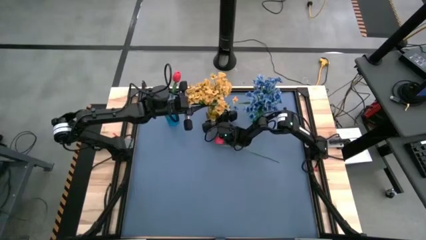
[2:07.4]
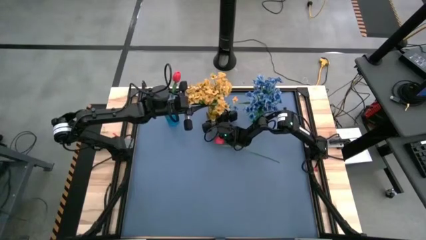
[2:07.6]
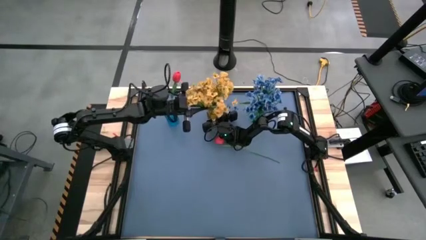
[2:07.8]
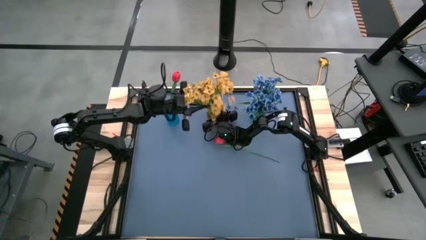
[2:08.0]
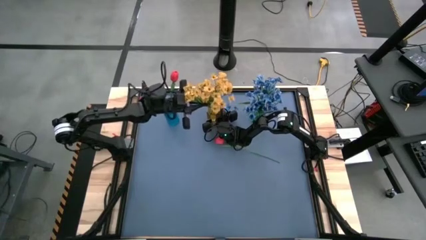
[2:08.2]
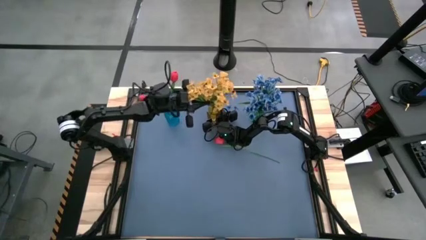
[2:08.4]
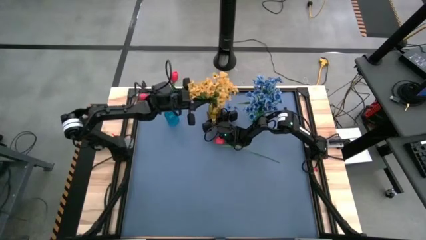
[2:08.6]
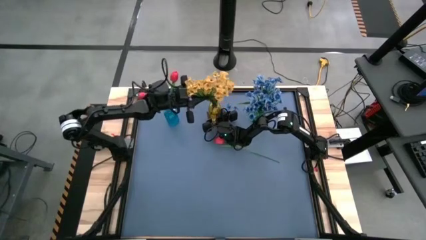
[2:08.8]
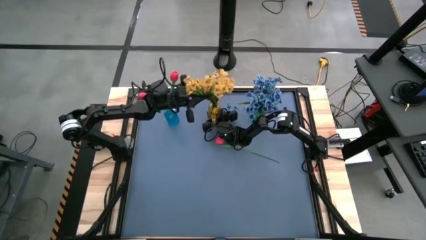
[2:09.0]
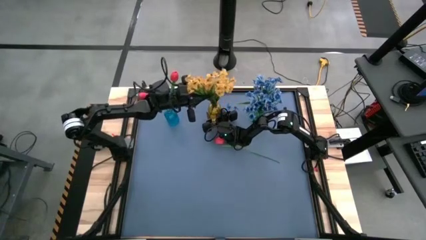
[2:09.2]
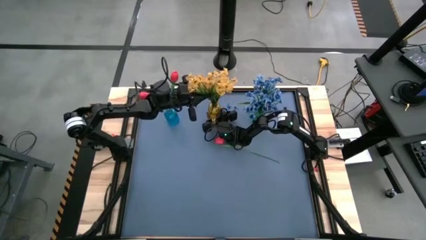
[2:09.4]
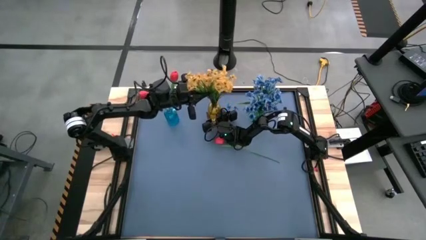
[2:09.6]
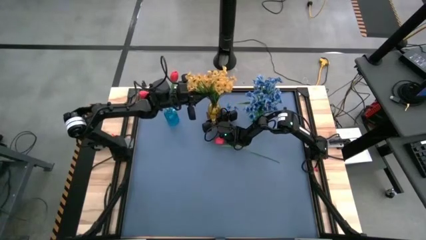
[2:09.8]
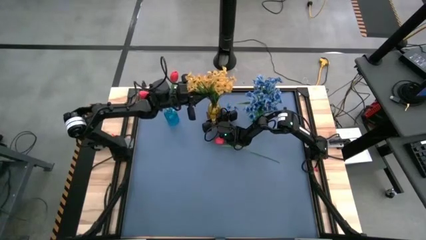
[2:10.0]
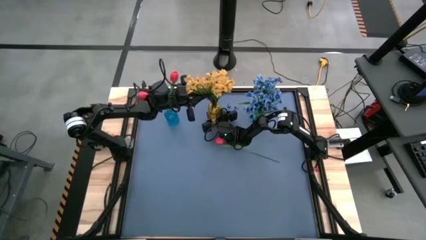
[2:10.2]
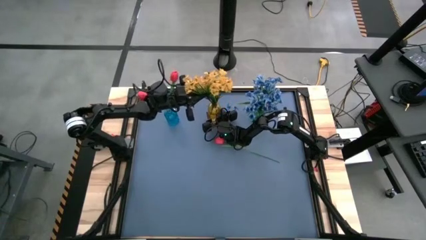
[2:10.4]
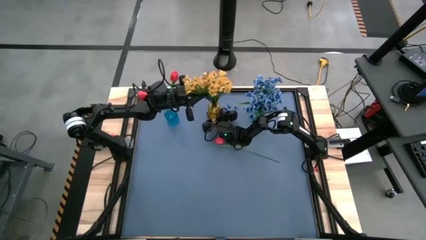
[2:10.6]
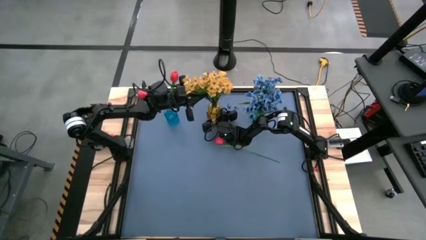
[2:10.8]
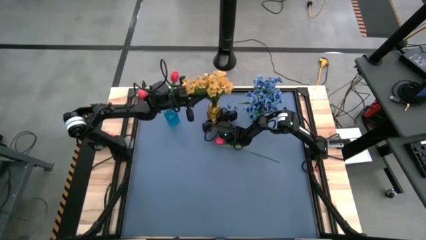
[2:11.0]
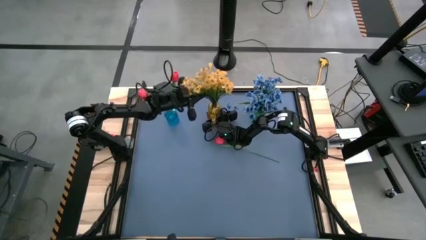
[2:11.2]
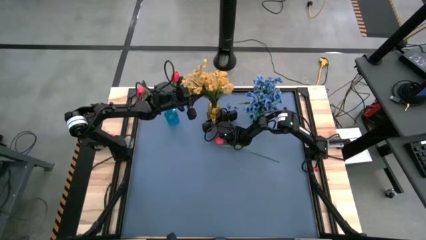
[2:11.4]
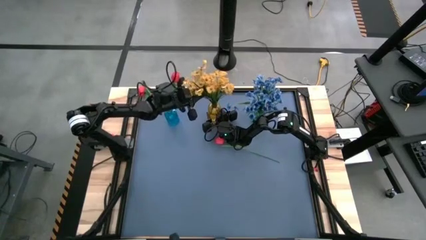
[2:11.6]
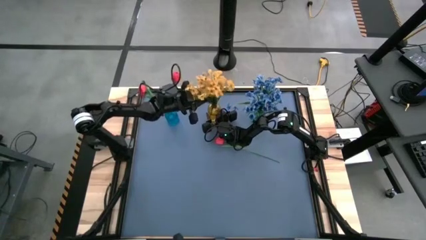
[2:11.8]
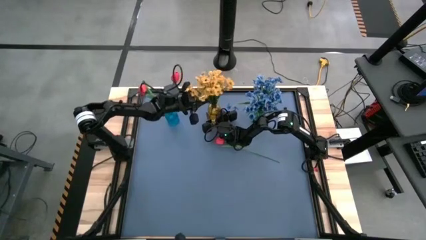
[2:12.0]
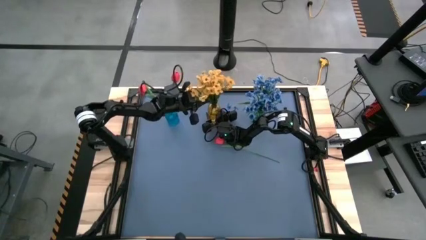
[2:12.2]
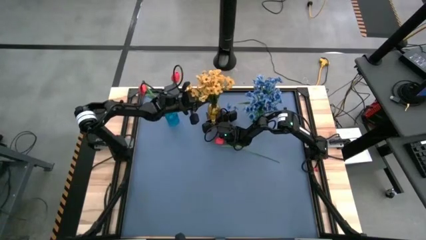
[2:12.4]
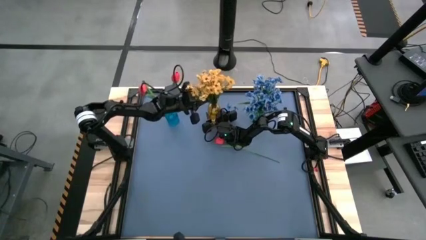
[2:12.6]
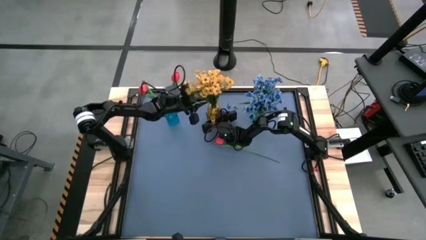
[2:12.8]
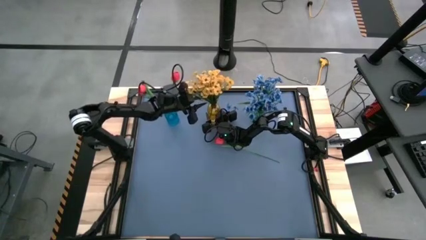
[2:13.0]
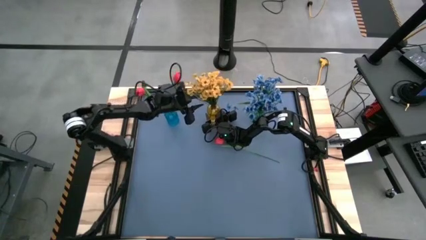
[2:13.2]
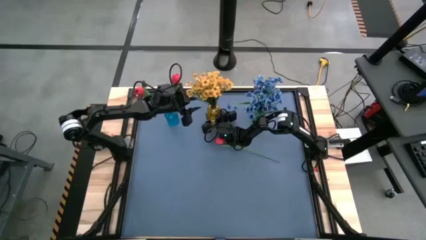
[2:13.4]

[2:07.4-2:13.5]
Task: Sort flowers into vase by color
Put the yellow flowers into the yellow vase

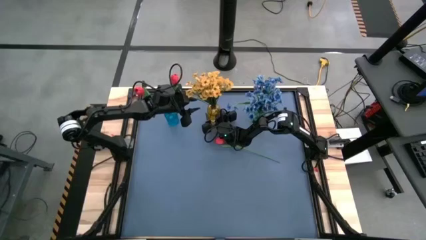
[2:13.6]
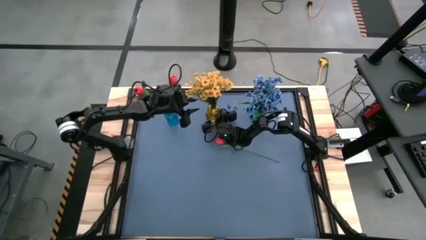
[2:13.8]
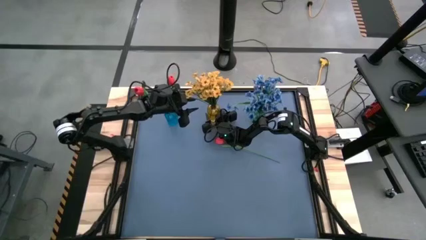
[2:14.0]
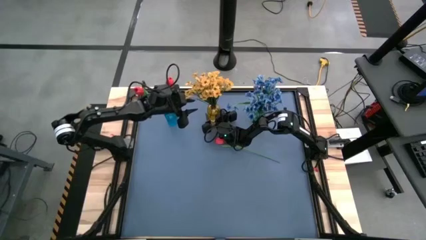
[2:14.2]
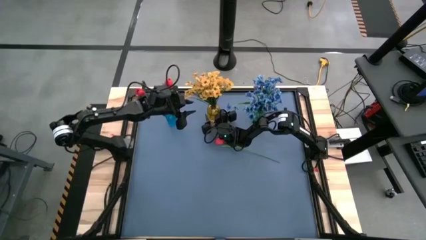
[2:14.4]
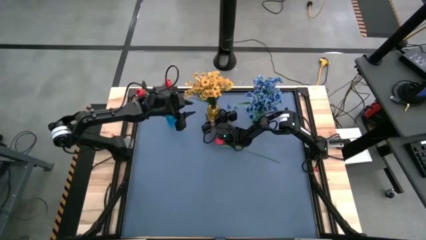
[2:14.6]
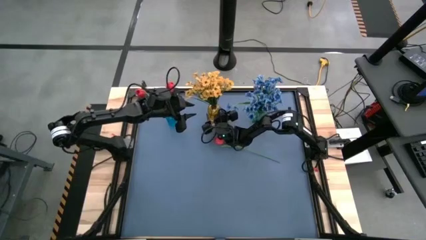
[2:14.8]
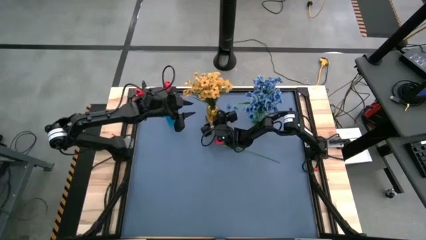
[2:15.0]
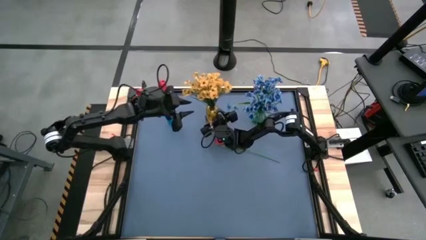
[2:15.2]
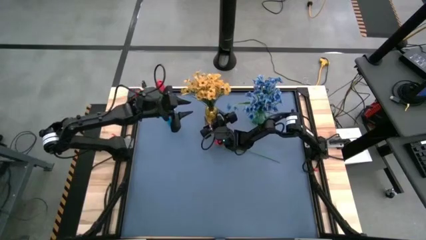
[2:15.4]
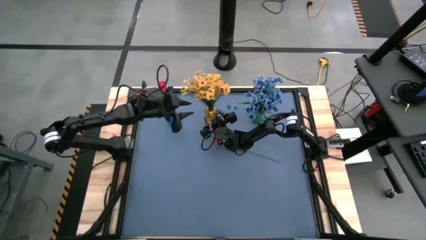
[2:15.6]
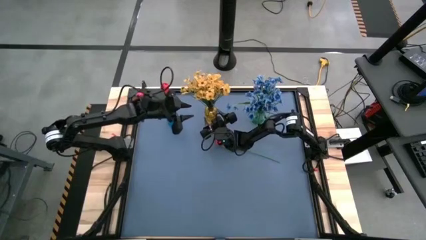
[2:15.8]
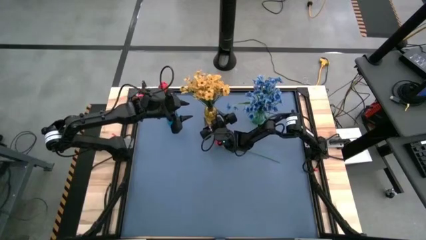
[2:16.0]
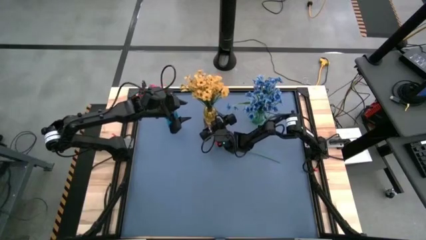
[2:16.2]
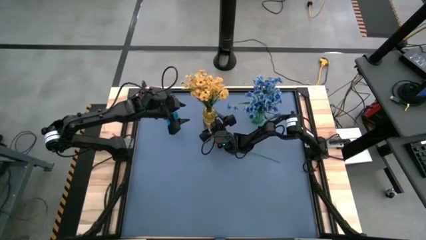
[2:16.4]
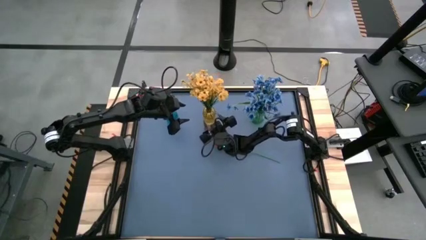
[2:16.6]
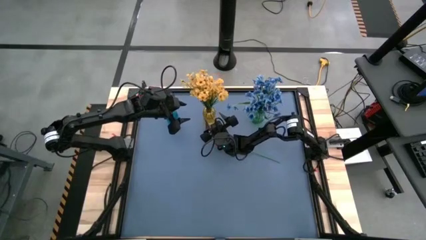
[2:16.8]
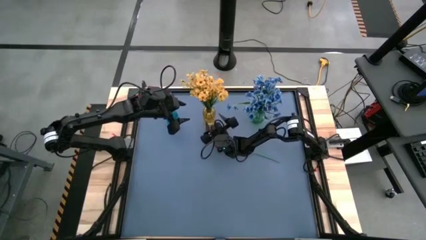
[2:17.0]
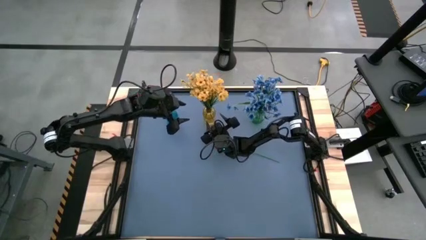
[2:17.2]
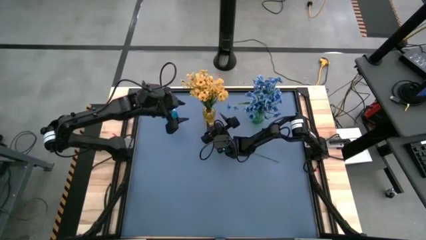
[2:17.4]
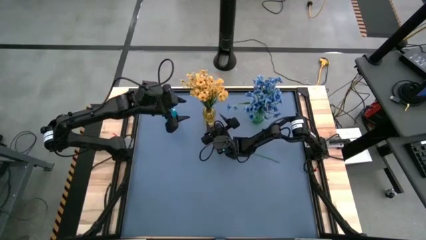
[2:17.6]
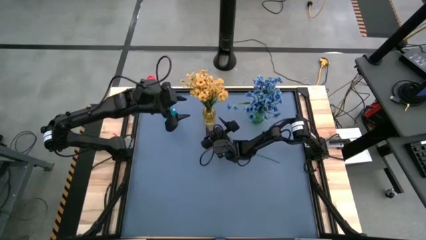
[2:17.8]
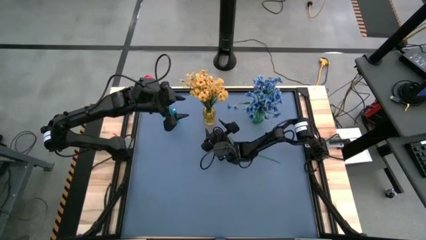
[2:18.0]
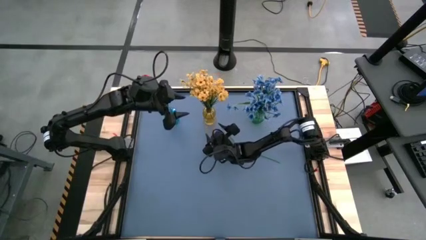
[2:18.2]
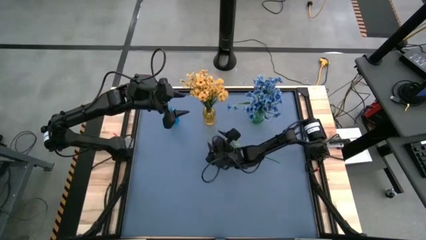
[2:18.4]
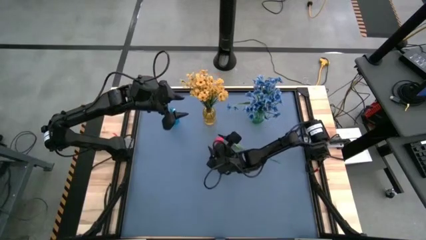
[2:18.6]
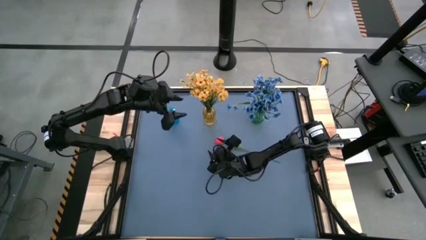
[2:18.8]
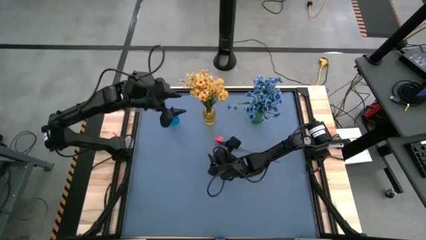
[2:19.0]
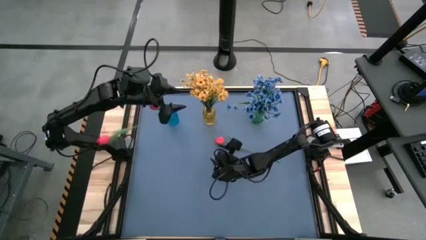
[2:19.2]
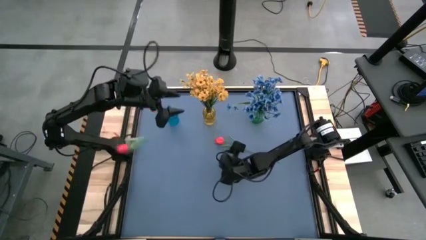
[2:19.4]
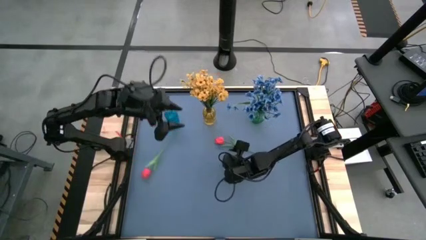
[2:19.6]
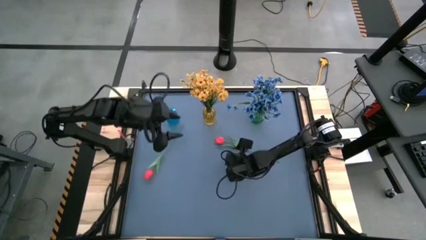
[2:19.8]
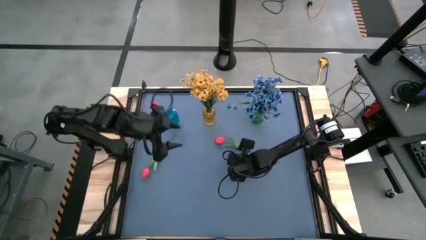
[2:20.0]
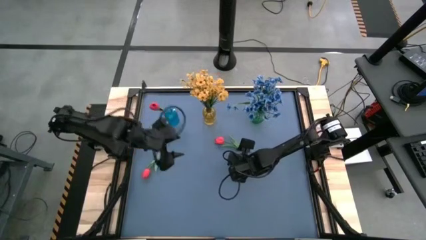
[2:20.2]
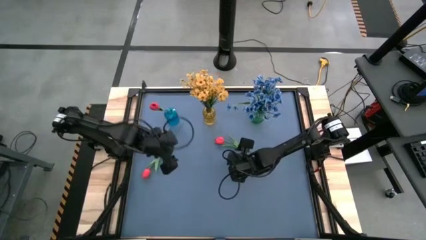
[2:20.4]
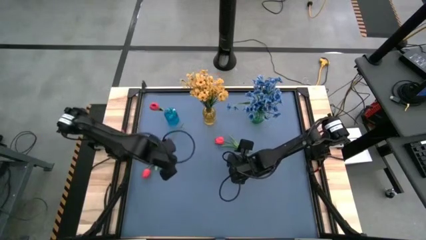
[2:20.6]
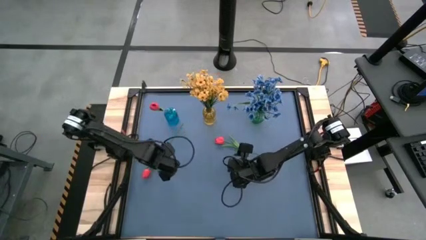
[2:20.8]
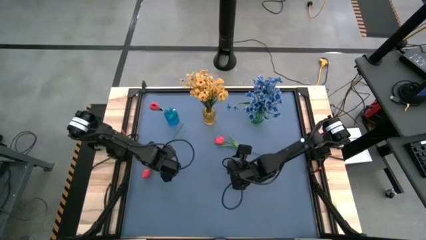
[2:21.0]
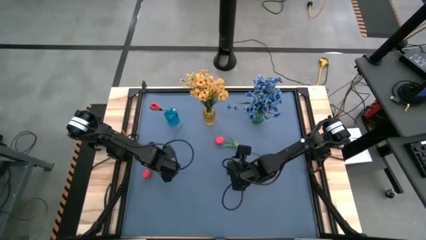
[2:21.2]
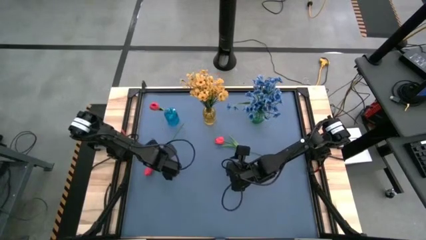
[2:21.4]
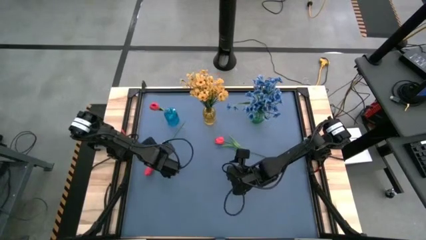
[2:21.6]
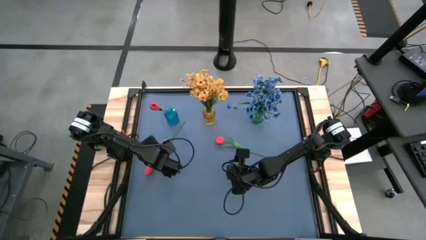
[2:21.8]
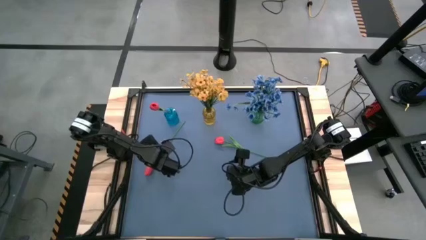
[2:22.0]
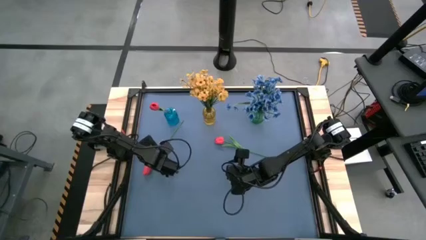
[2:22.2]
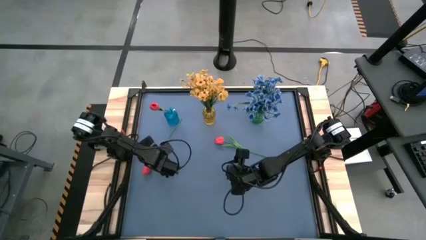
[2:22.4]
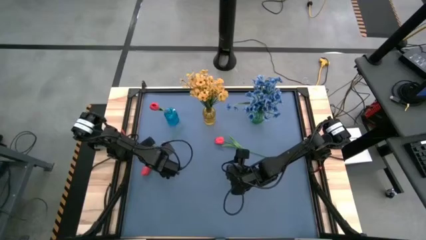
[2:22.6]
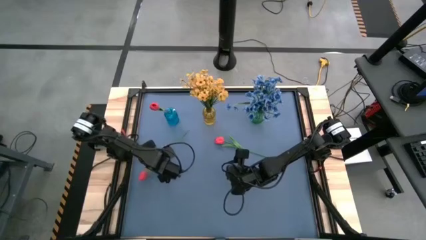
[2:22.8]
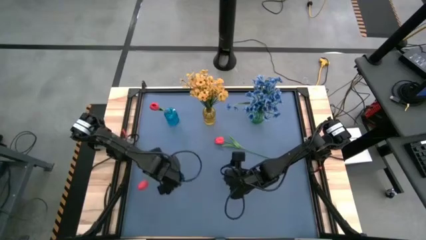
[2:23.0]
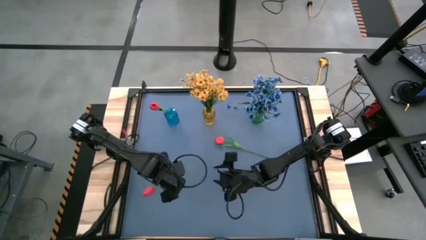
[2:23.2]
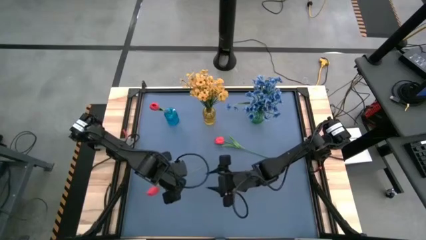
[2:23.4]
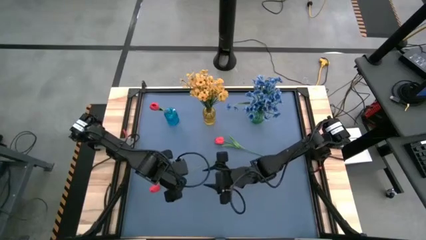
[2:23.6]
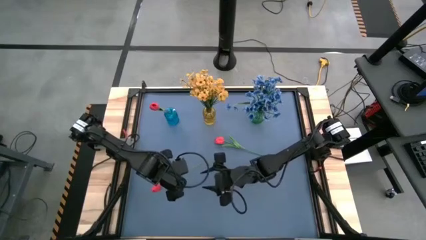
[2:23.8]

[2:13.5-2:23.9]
Put the bottom red tulip into the blue vase
